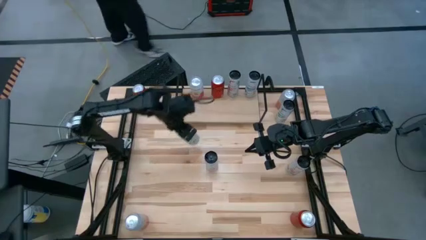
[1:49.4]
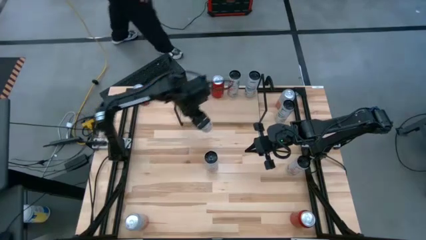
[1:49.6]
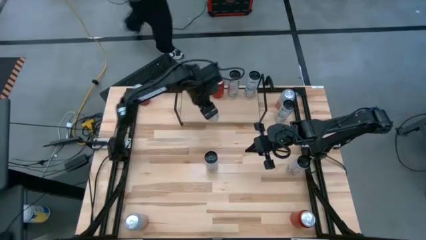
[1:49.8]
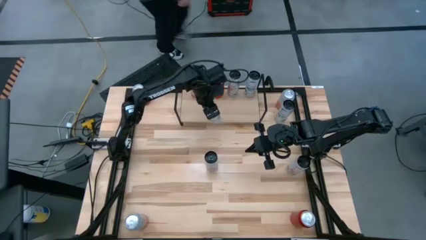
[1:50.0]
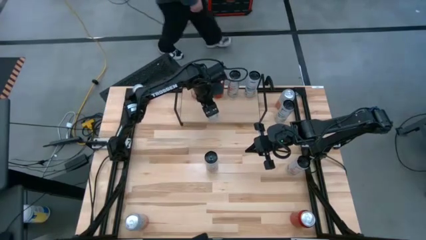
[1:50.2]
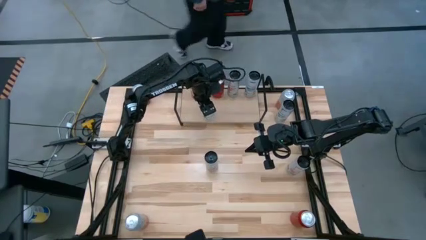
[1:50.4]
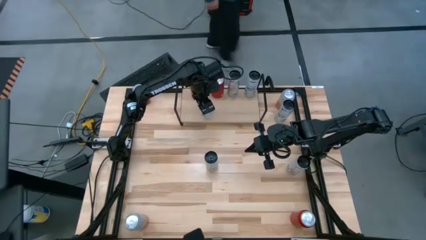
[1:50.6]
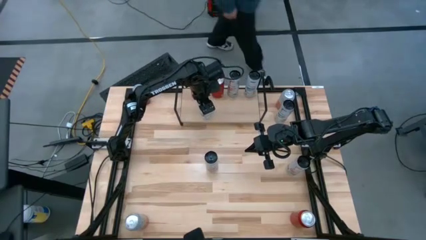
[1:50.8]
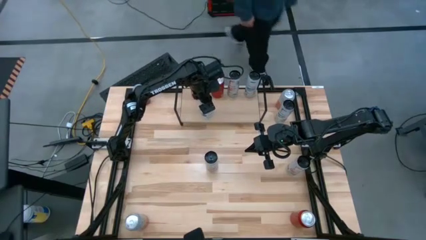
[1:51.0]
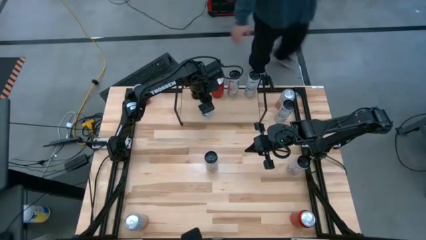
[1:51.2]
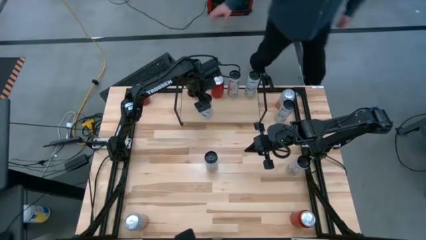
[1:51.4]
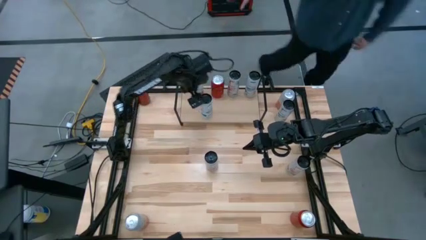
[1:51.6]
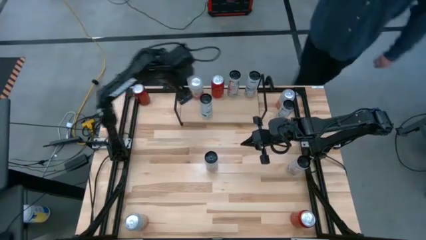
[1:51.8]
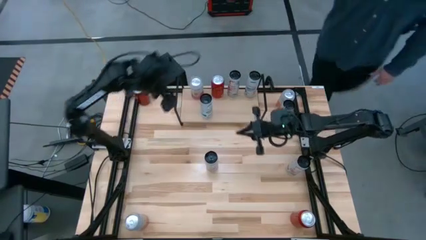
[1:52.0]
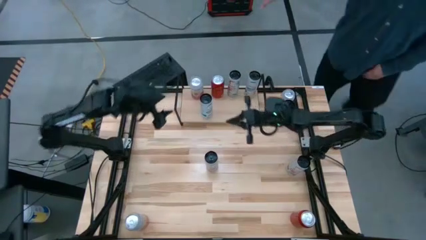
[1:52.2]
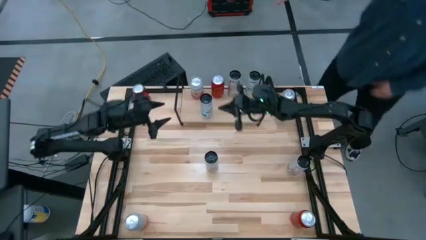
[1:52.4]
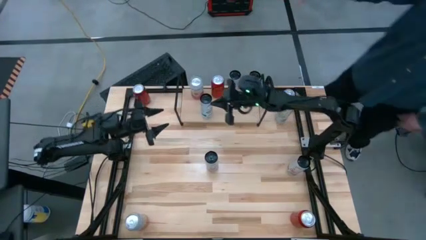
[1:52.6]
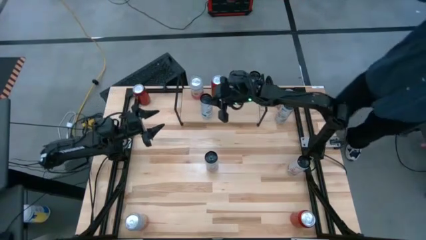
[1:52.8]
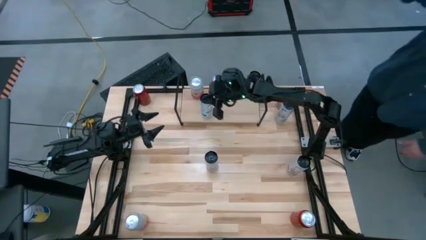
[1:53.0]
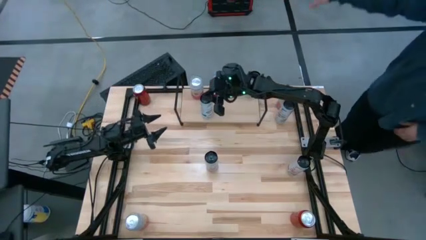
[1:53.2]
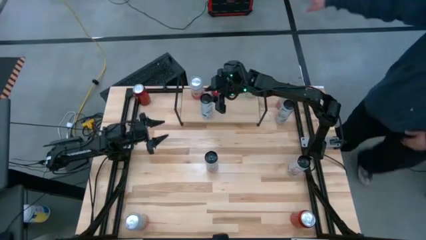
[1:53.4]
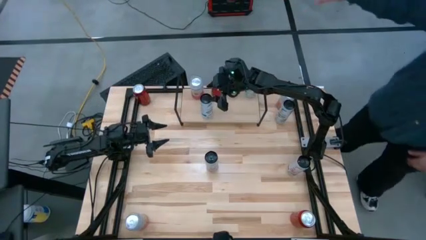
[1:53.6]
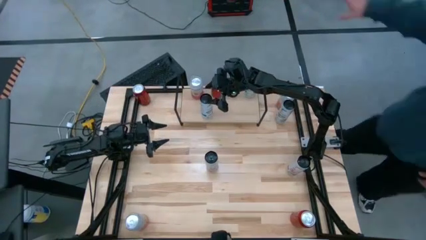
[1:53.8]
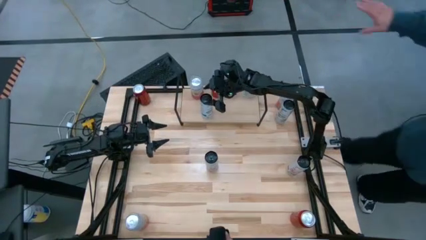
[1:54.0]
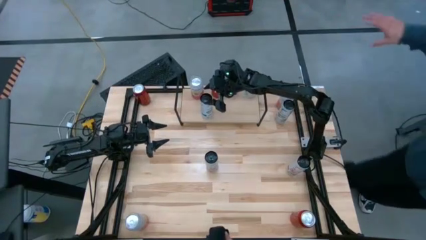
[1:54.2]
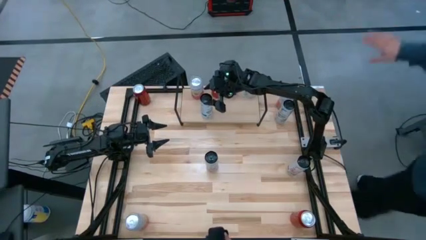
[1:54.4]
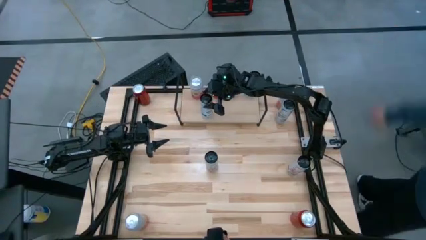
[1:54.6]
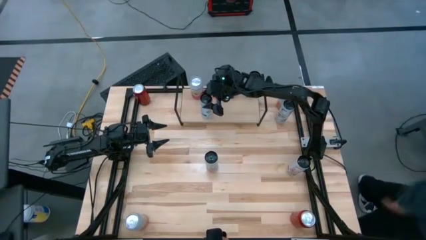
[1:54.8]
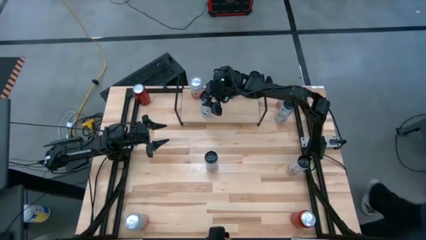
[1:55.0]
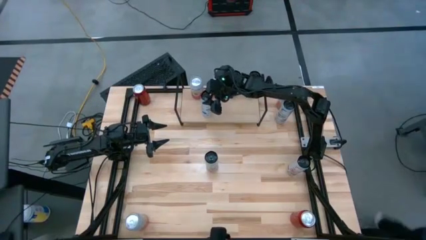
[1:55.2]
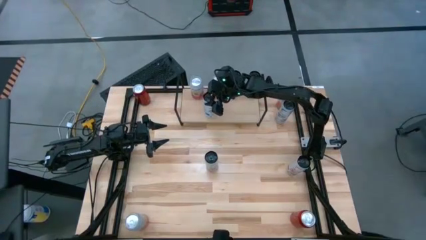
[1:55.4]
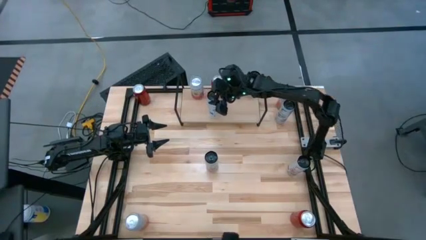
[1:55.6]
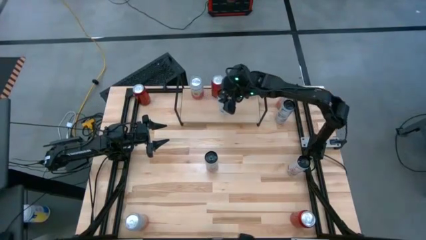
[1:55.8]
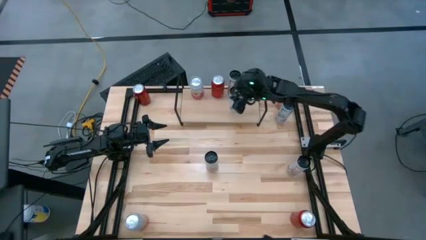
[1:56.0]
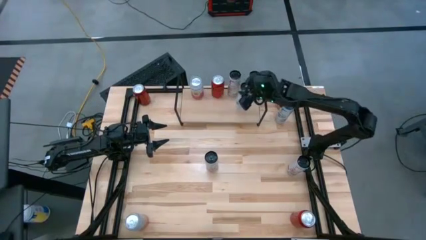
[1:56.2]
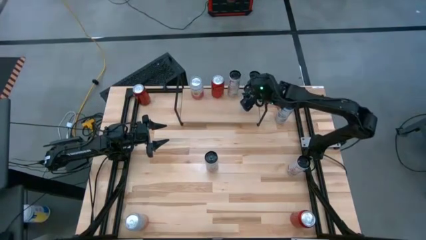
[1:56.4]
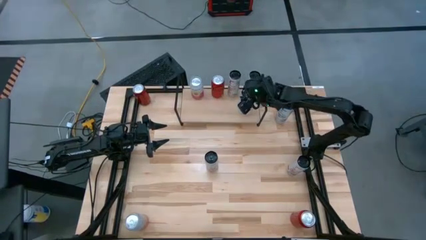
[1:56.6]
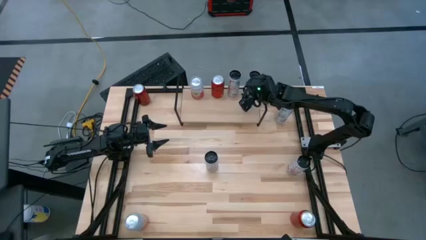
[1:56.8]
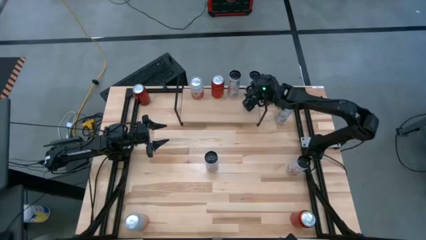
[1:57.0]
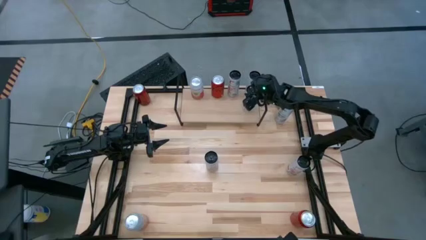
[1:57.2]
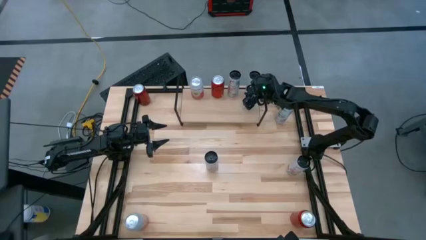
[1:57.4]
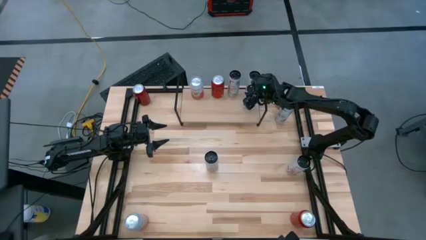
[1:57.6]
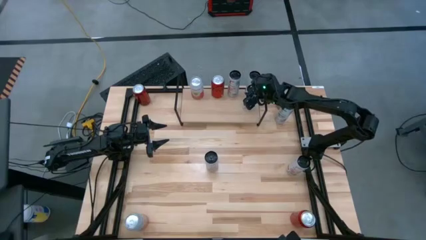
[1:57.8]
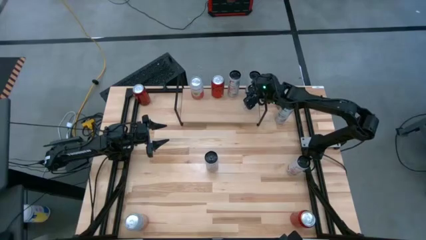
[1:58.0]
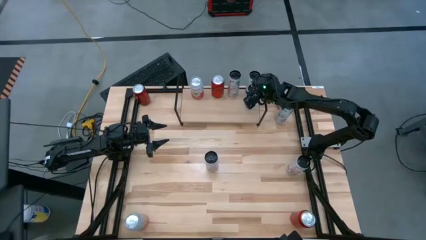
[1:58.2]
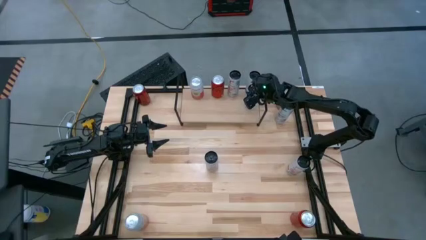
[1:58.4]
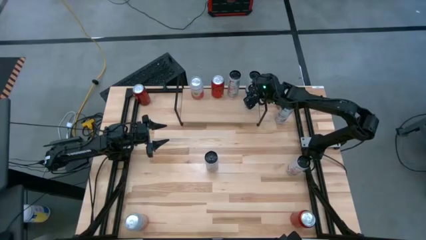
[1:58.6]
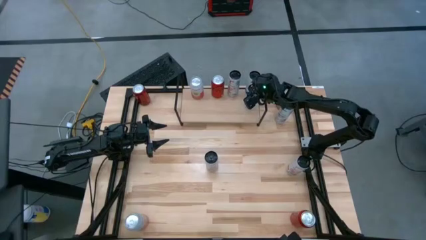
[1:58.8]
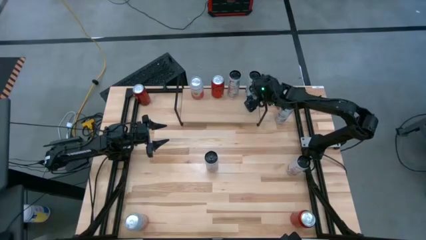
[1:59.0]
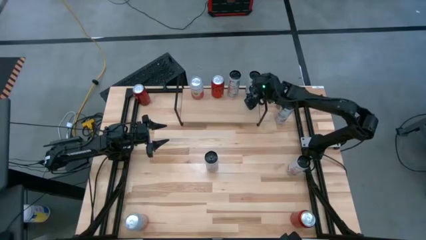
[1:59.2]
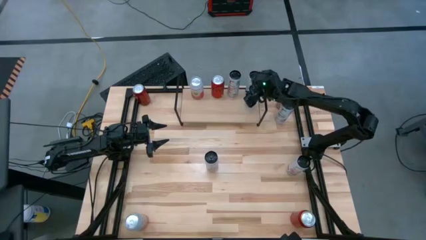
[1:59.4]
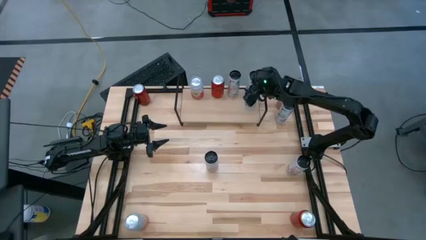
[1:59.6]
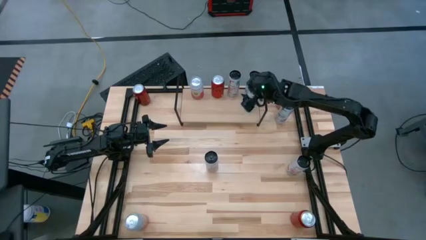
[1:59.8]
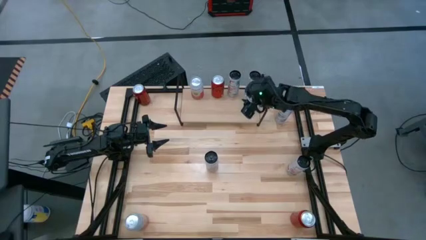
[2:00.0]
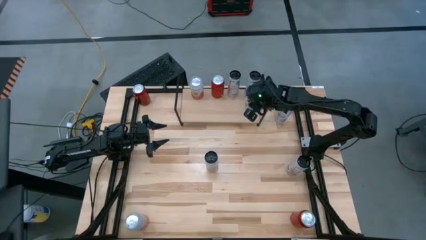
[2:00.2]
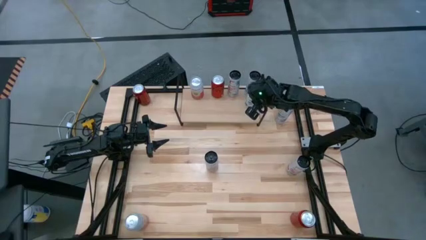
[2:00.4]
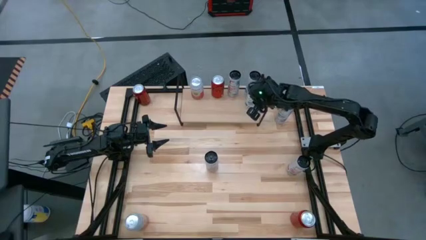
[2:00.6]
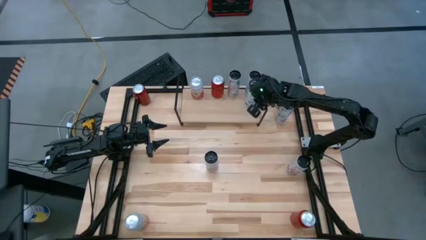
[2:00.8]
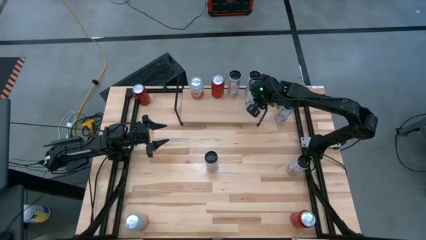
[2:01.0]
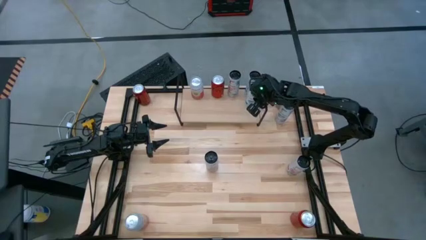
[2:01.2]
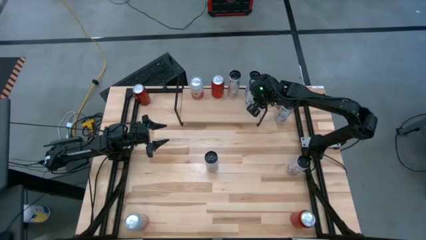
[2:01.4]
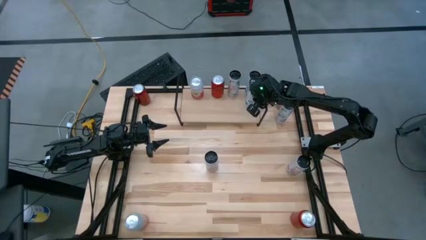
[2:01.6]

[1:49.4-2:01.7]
Task: Place canned beverage on shelf
Put the left white blue soda can on the shelf aligned with the other white blue soda can

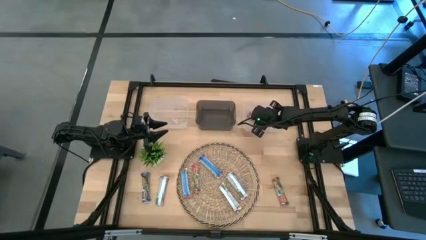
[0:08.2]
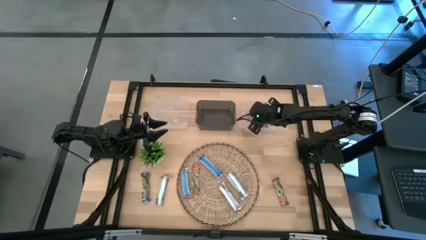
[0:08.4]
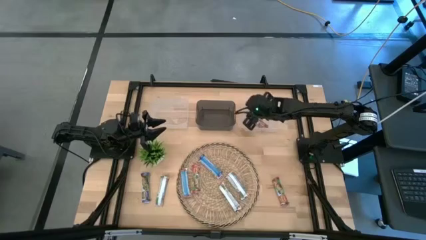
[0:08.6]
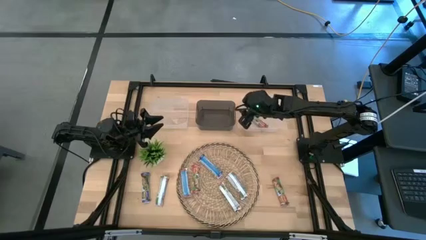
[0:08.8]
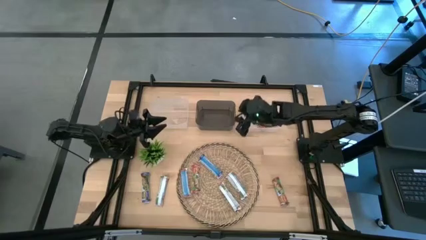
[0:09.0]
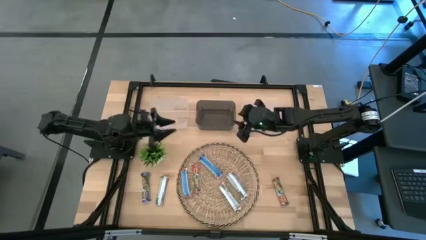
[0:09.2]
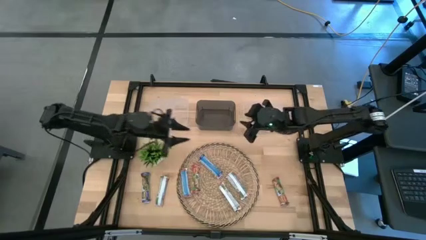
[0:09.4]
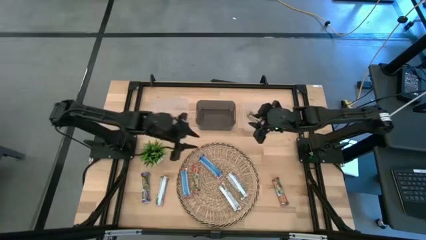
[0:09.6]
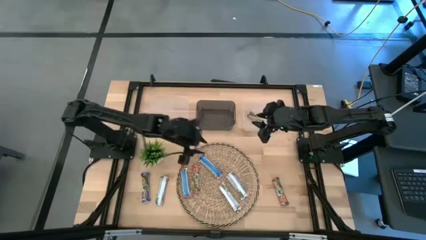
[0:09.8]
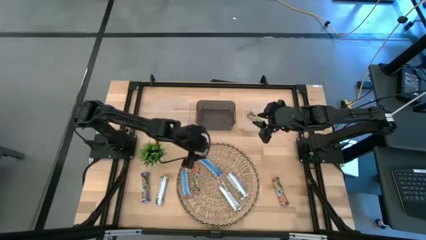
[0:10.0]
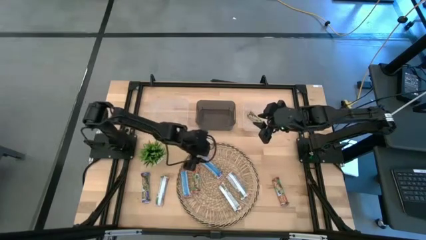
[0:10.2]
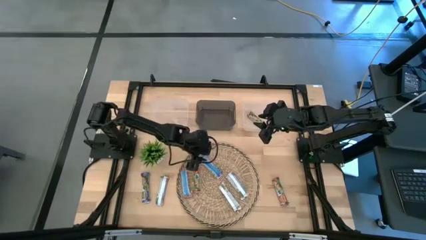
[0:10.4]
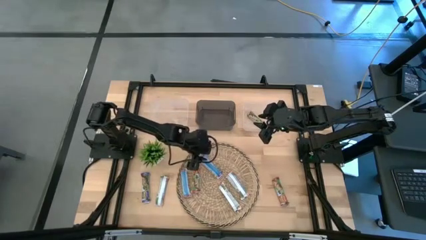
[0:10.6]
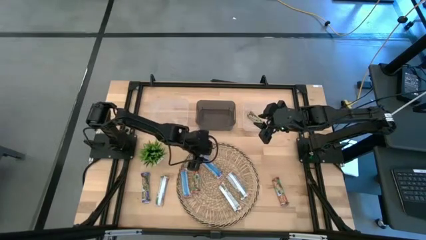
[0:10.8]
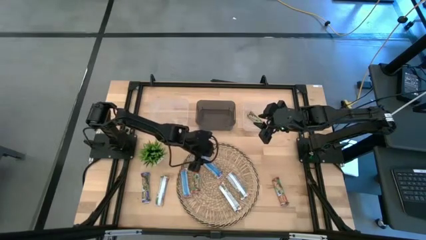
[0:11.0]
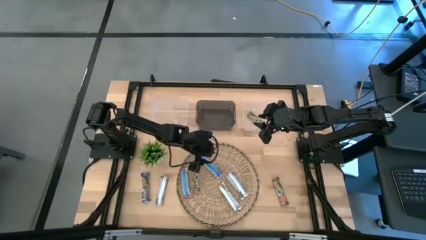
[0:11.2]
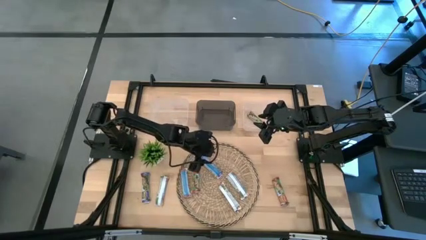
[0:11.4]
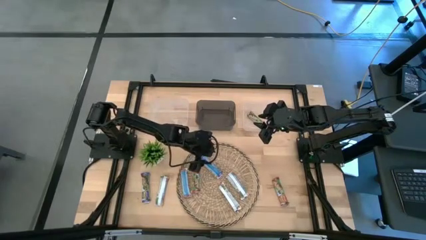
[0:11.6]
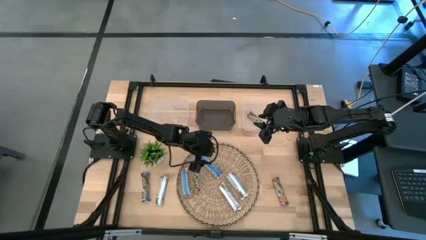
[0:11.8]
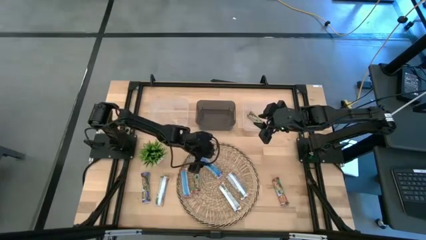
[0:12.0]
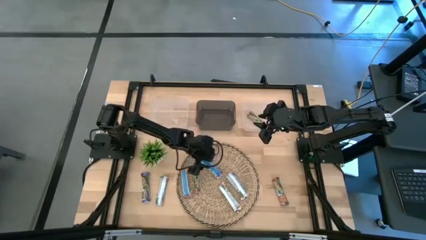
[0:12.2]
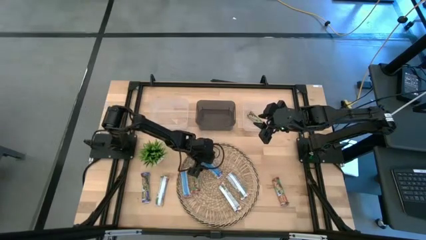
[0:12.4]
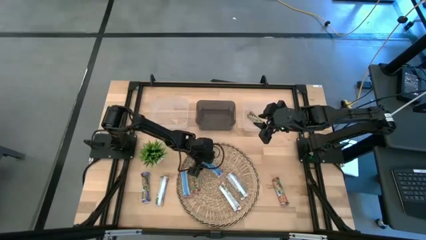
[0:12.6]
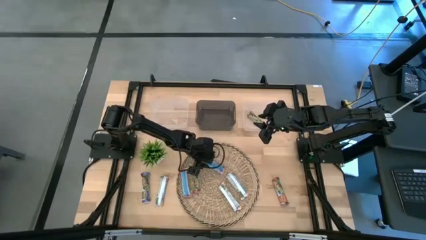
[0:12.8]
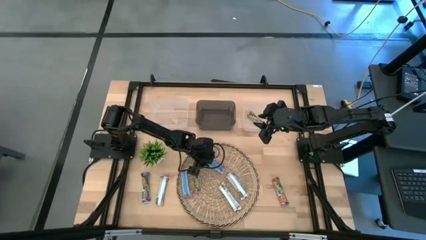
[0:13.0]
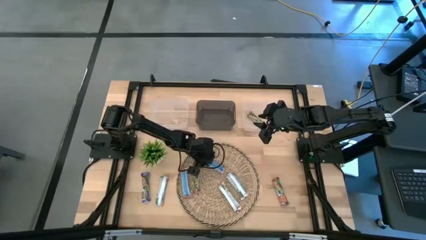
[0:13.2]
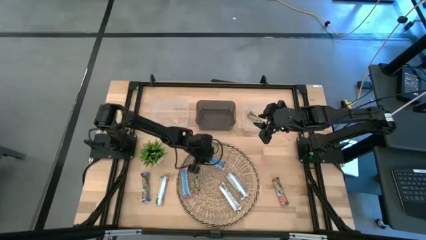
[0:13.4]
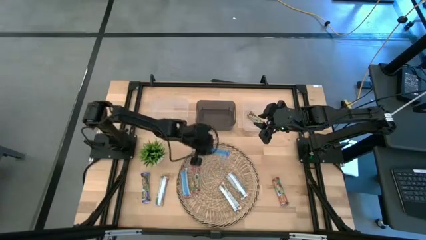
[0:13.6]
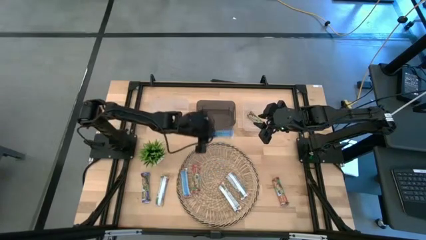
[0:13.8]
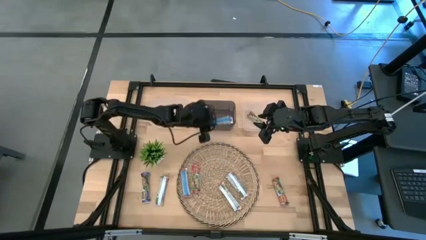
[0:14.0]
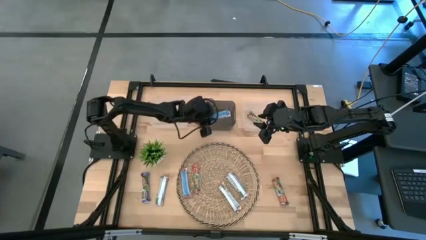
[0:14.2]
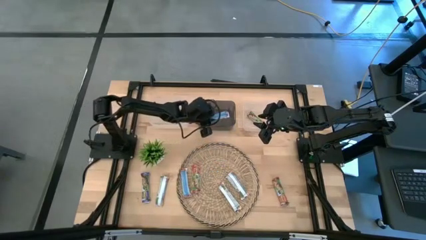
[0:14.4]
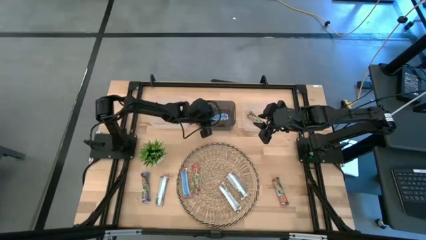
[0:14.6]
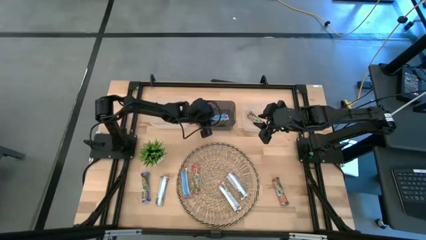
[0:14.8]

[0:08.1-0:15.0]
Task: Pick and place Granola Bars by type
Put the blue granola bar into the black bin
